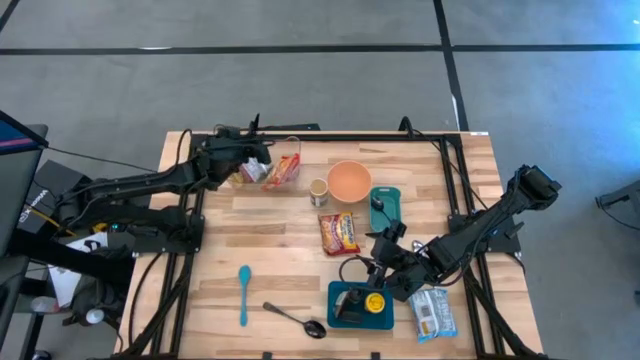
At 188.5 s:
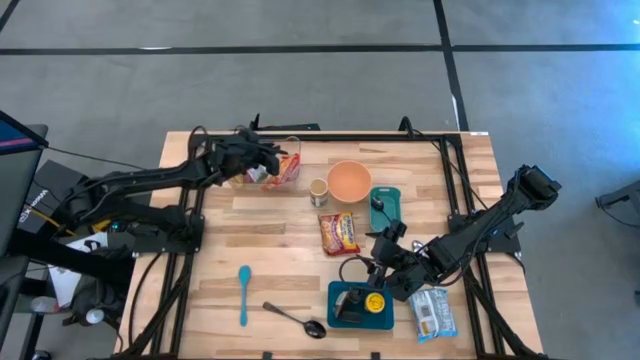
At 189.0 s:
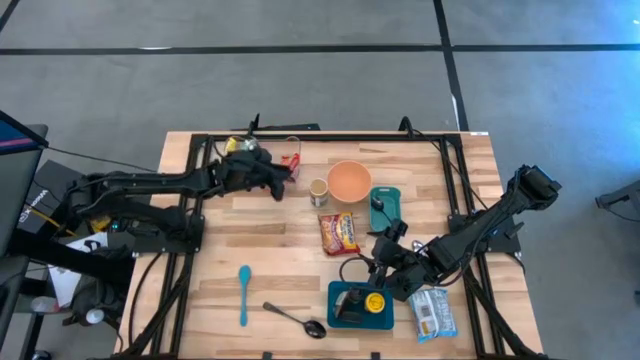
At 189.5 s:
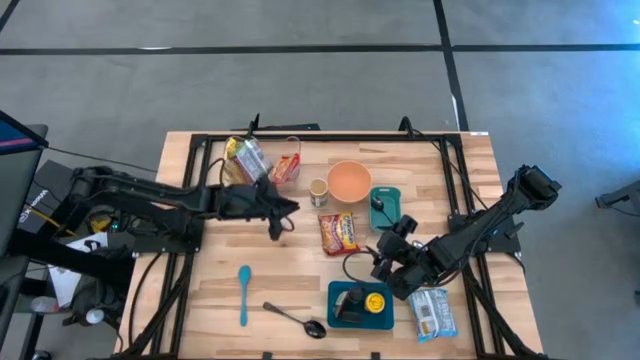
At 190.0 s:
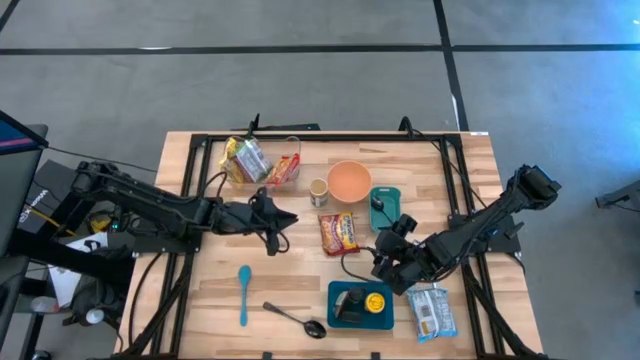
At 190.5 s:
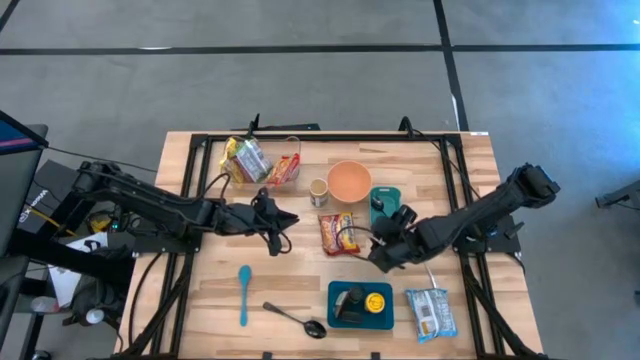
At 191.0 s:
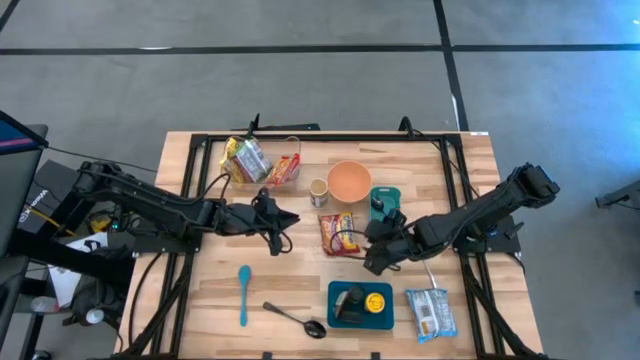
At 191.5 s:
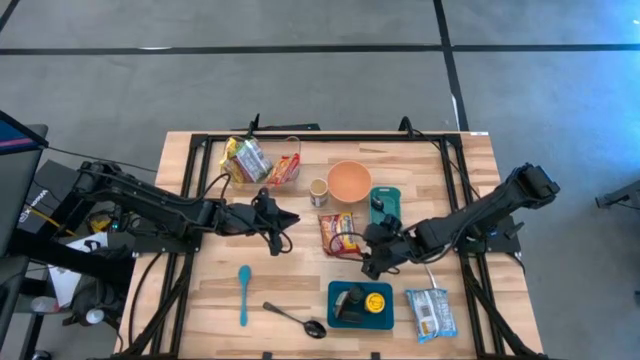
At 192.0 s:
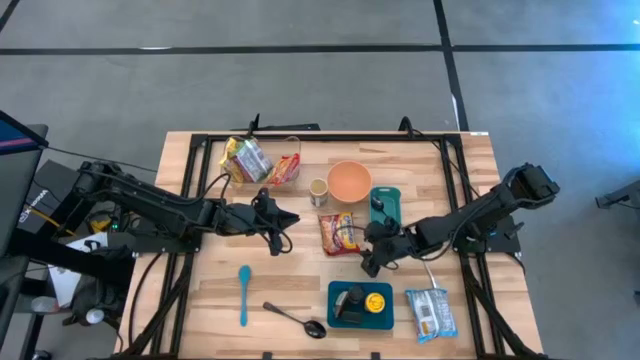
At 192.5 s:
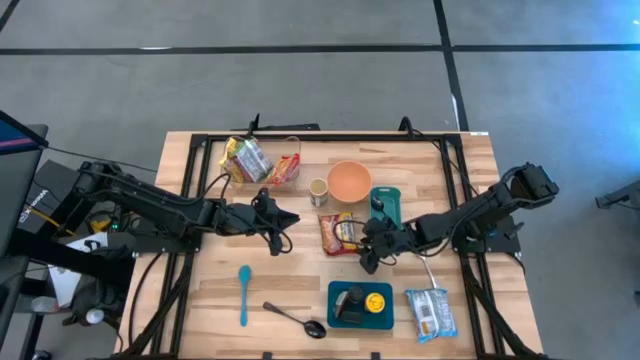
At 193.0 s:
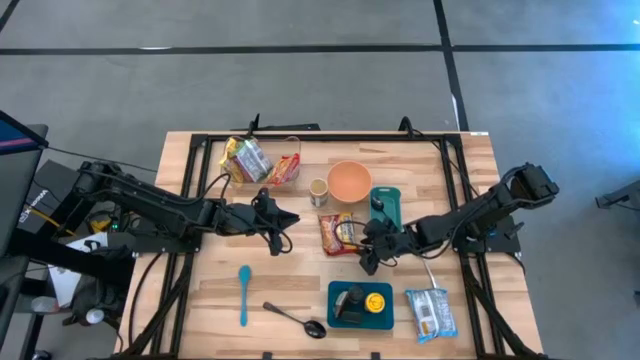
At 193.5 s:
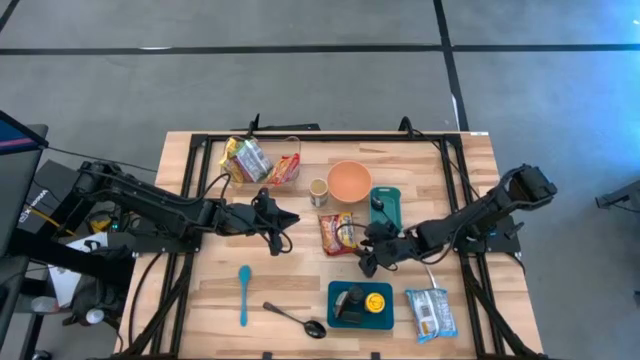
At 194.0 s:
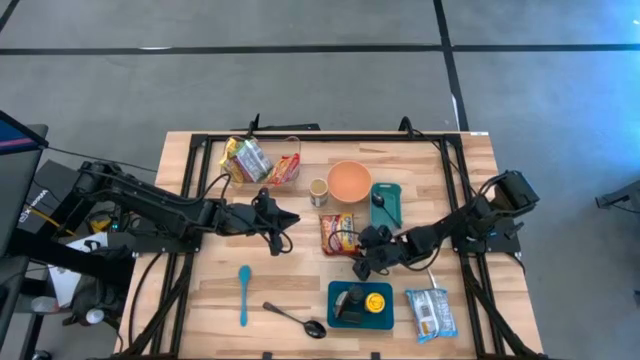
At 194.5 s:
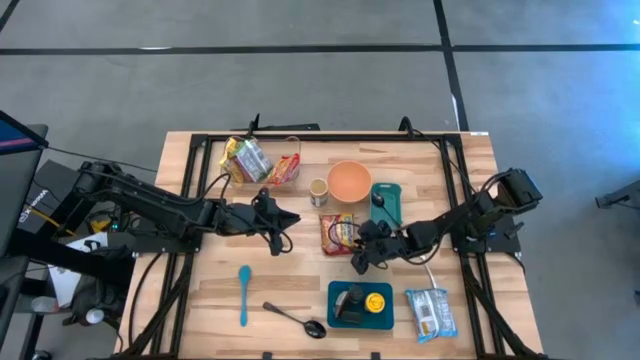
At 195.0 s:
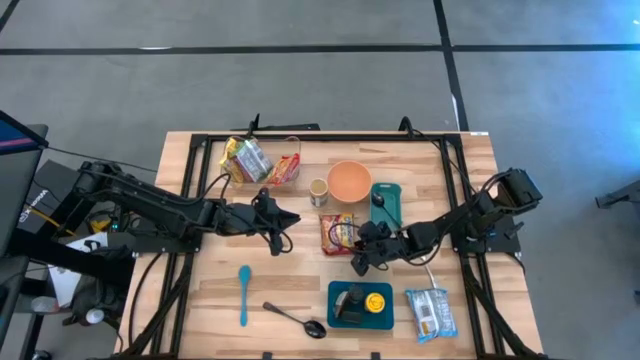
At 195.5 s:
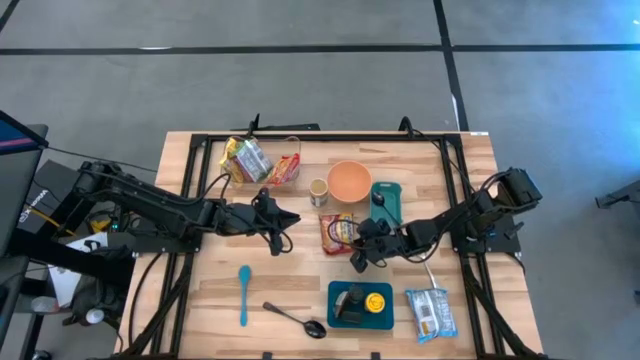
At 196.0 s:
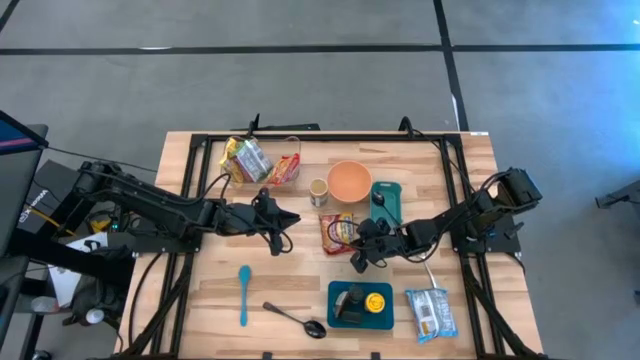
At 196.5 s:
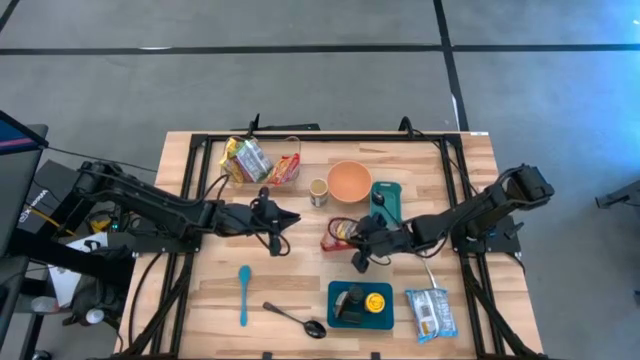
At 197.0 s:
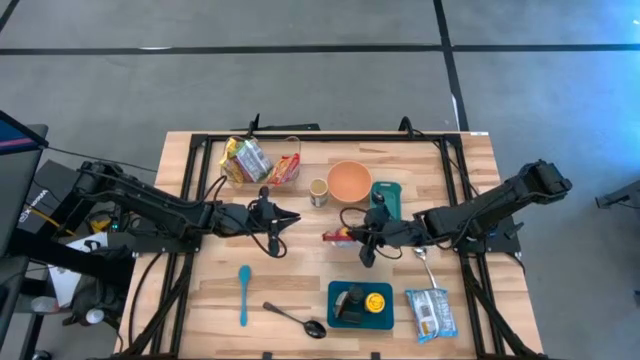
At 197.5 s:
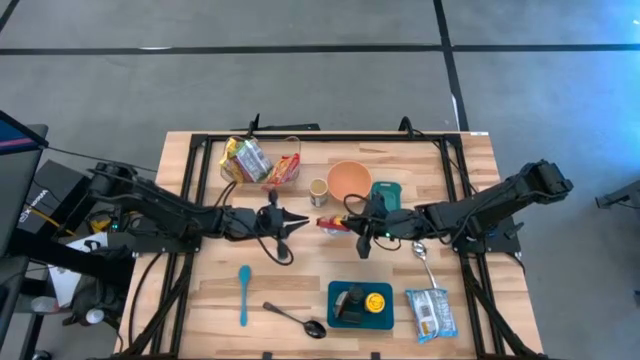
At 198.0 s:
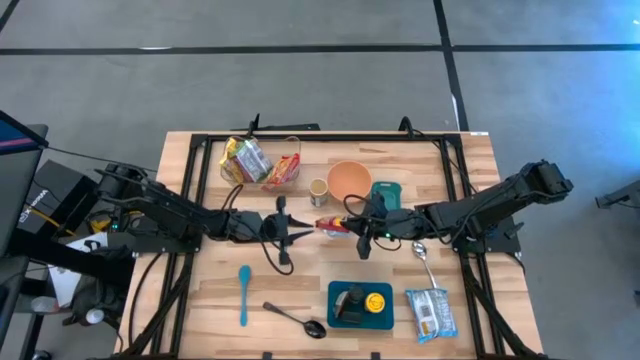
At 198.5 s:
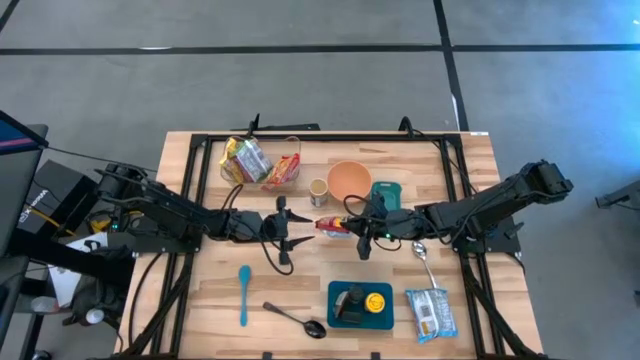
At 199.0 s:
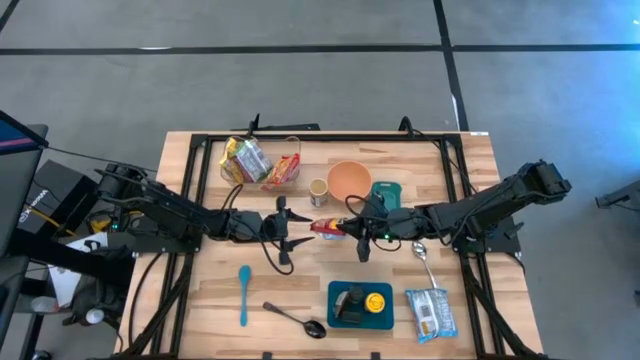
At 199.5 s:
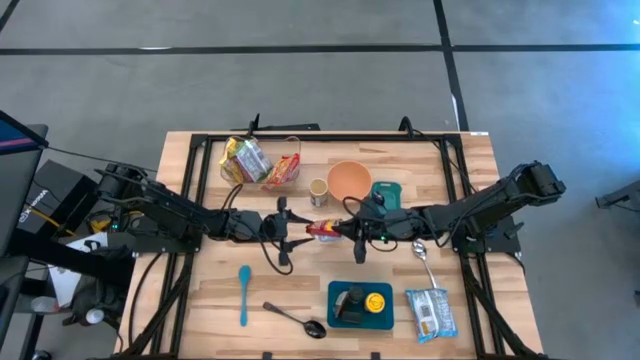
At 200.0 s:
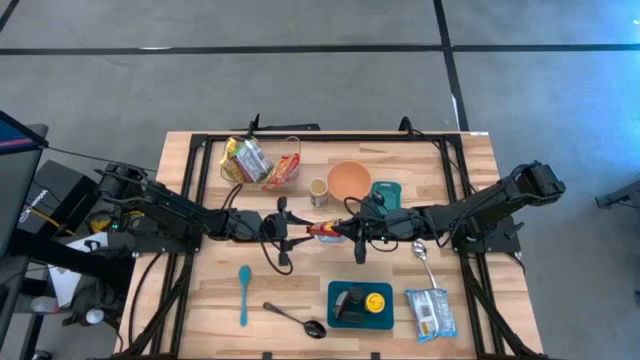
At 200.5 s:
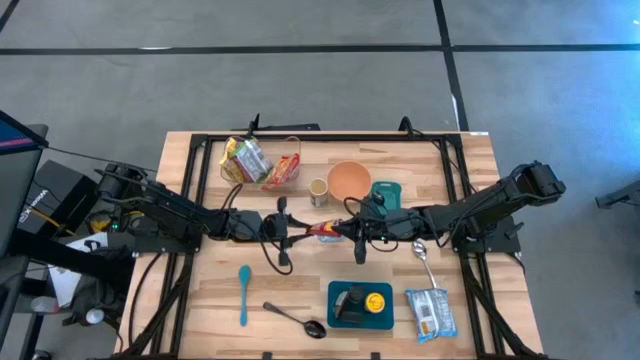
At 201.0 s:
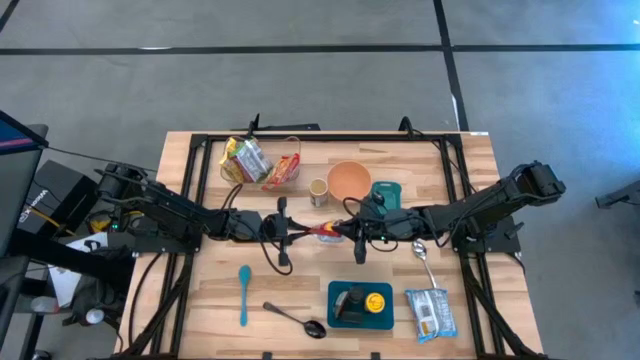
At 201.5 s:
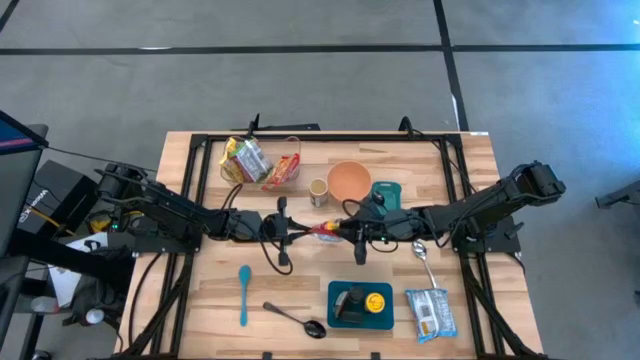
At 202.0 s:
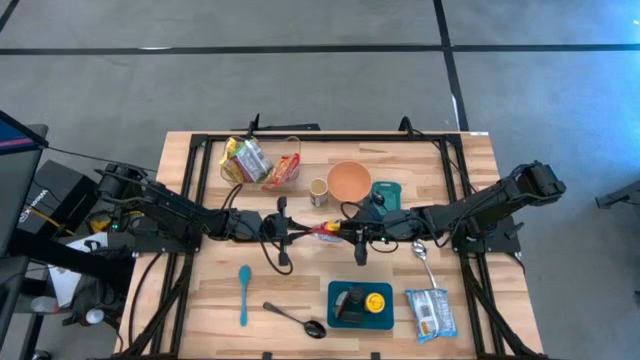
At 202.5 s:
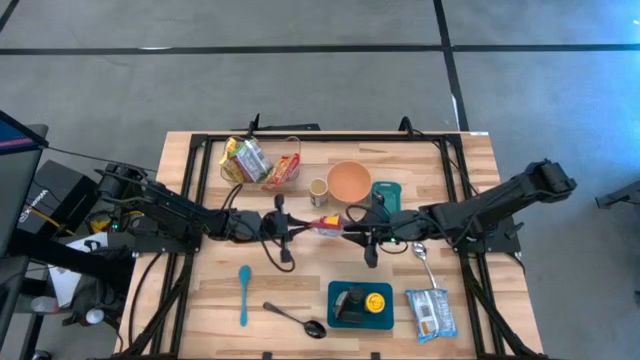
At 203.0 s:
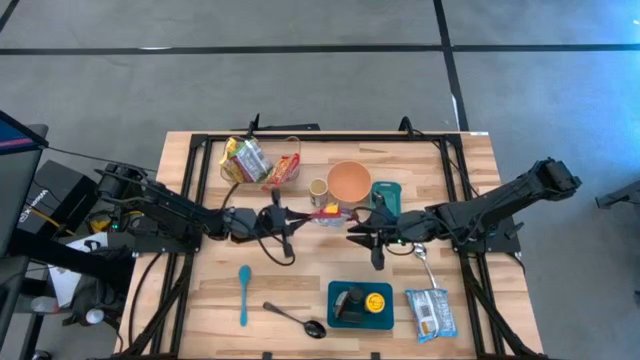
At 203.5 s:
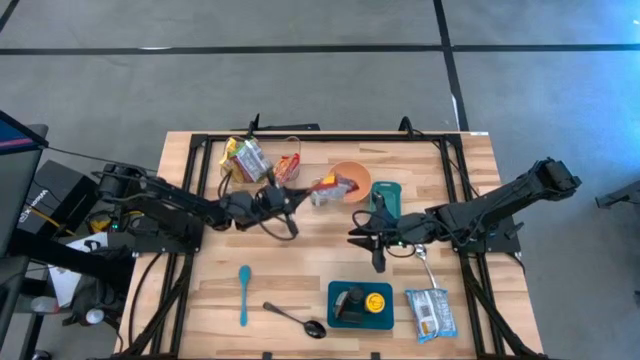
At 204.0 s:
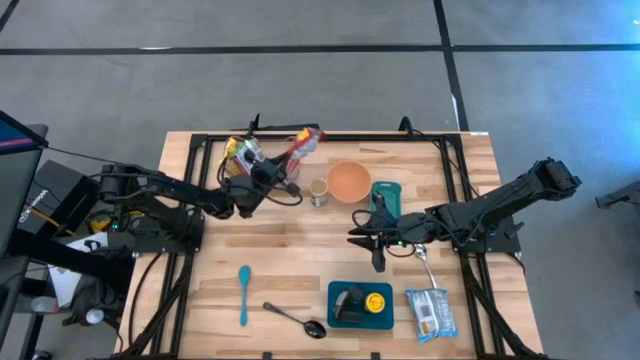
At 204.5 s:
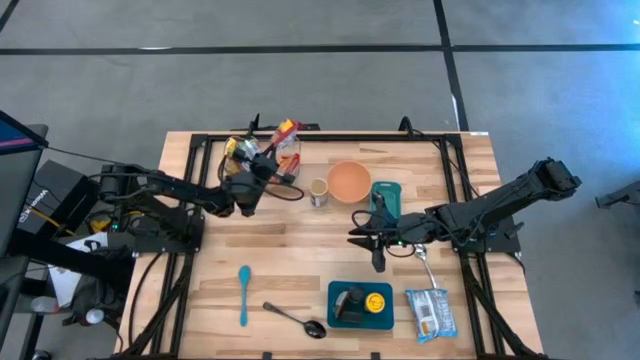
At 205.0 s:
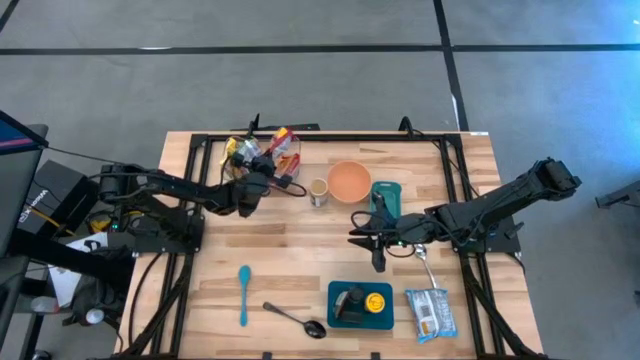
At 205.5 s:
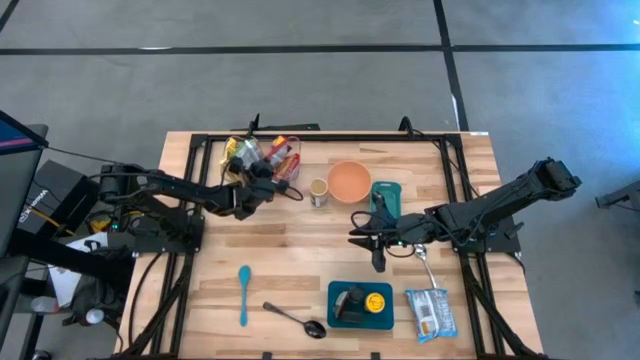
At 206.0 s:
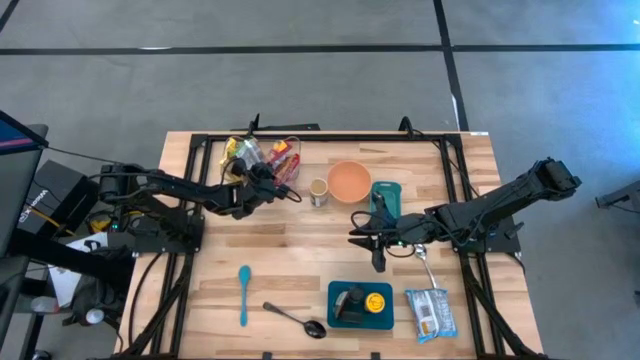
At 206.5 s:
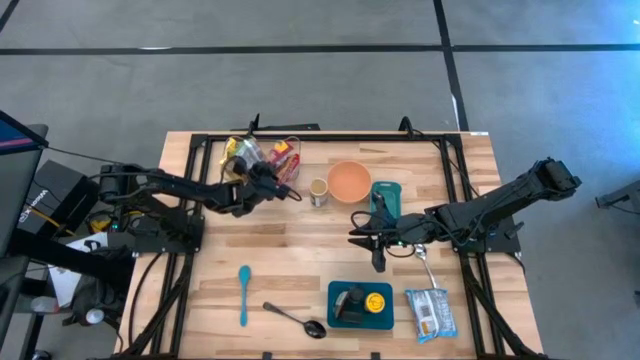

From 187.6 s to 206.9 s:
Task: Pick & Place Food Item
Put the red noodle pack into the transparent bin

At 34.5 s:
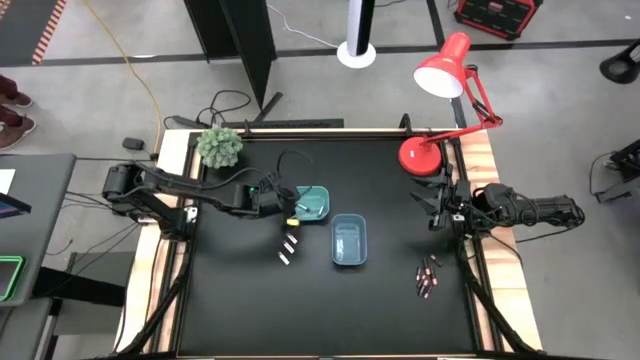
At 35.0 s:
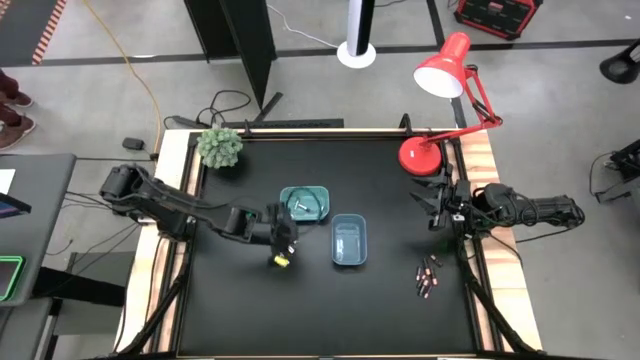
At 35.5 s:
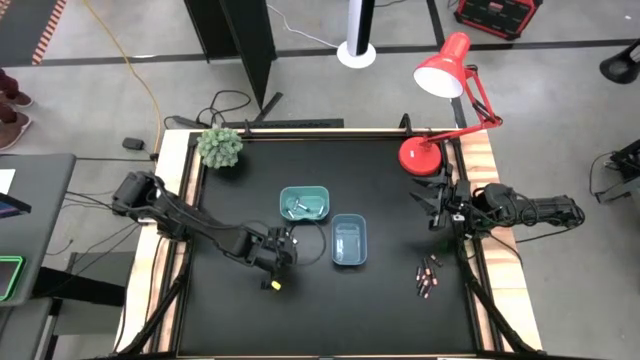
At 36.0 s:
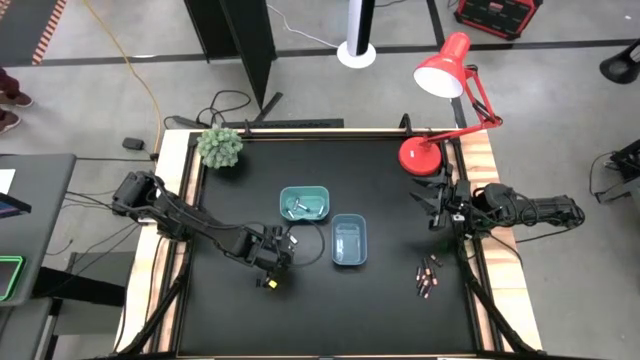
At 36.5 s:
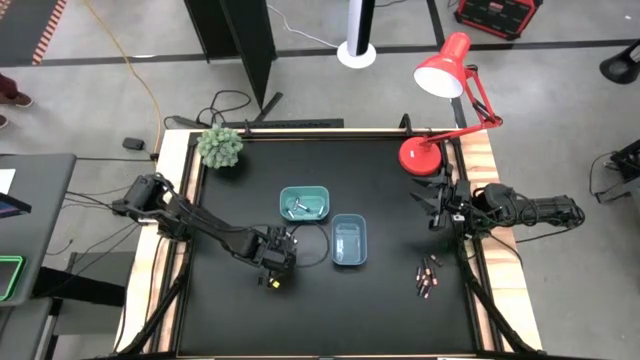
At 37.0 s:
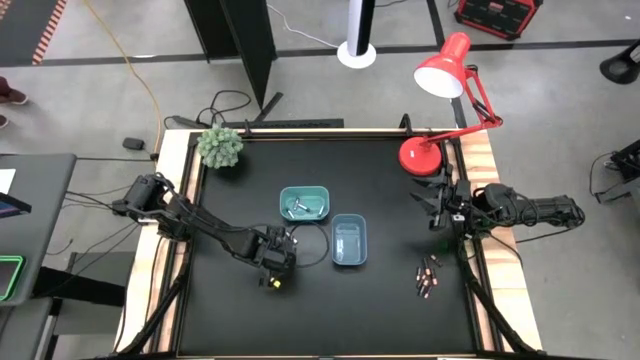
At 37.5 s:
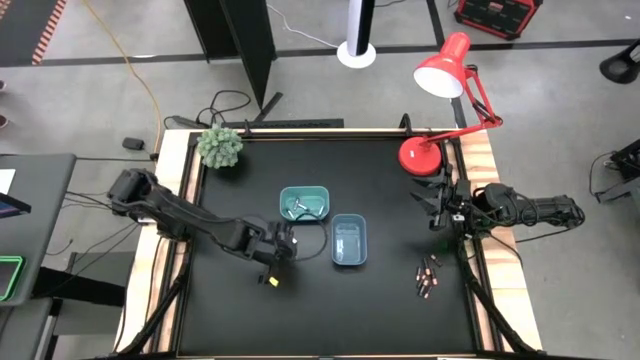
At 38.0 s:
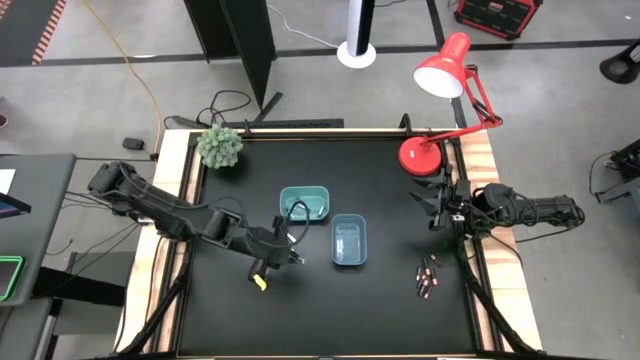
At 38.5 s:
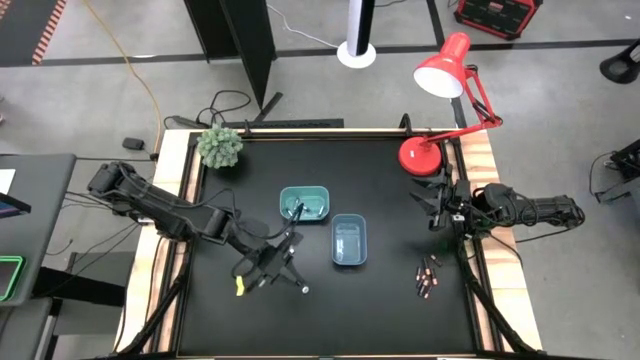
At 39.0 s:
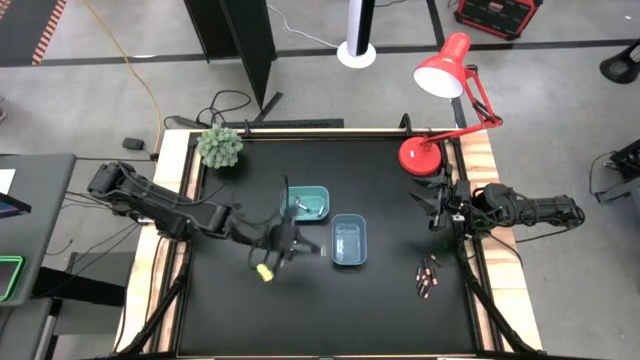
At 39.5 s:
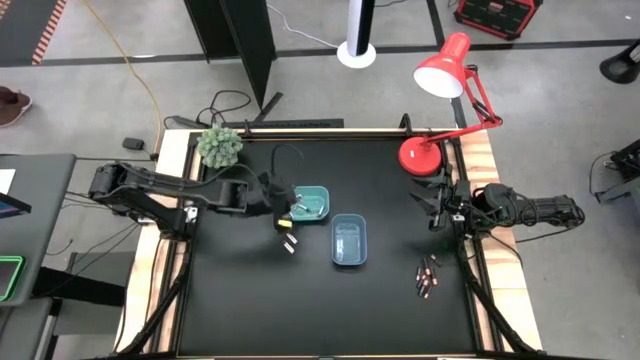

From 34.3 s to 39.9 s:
Task: Sort batteries
Put the silver battery into the light blue bin
